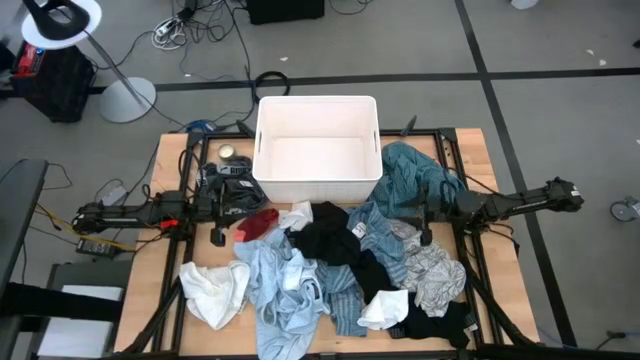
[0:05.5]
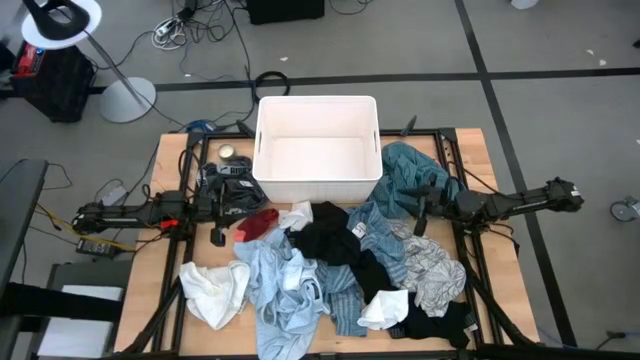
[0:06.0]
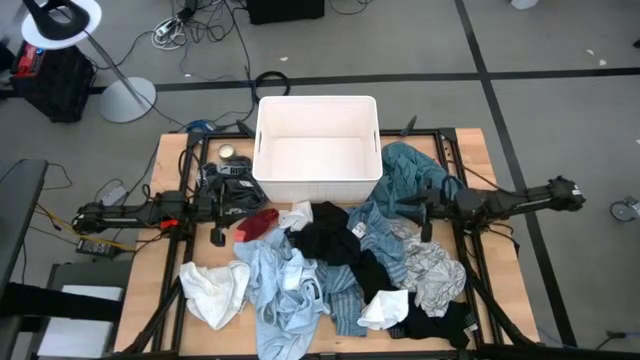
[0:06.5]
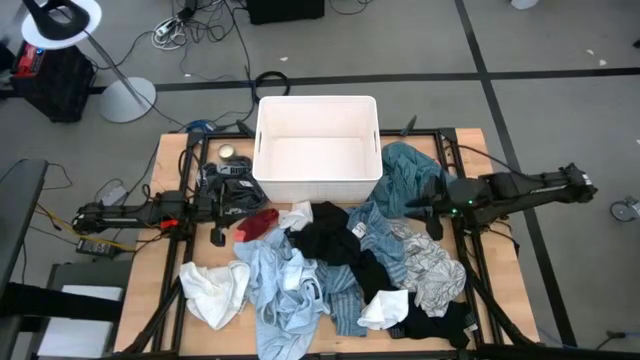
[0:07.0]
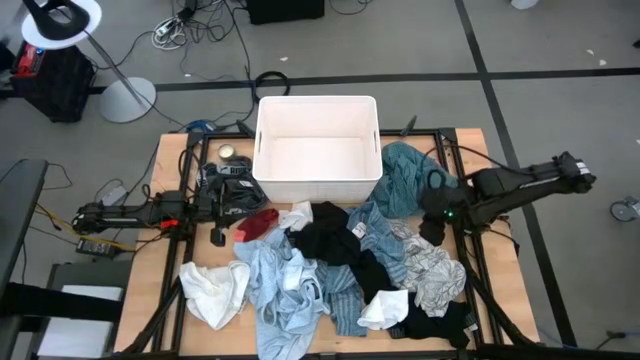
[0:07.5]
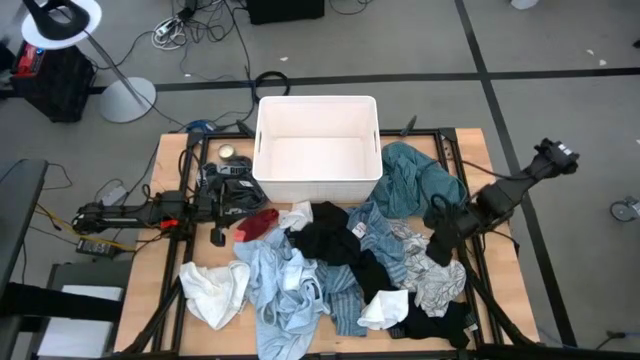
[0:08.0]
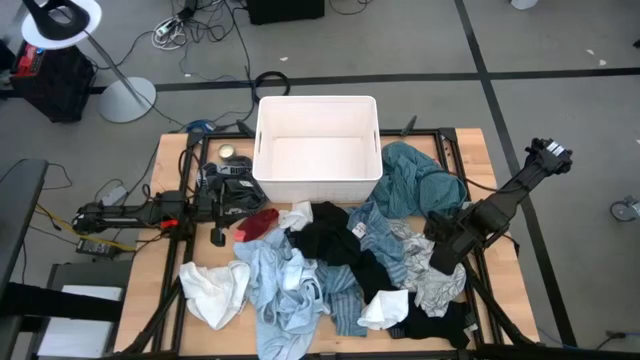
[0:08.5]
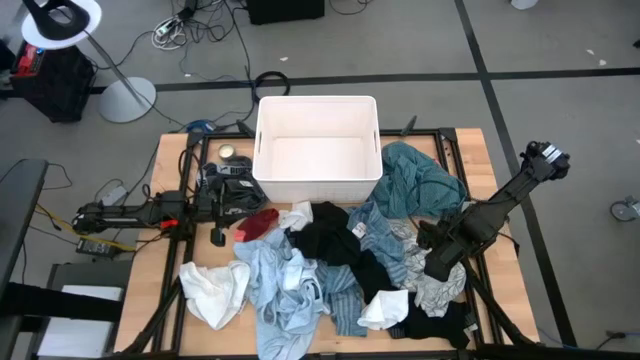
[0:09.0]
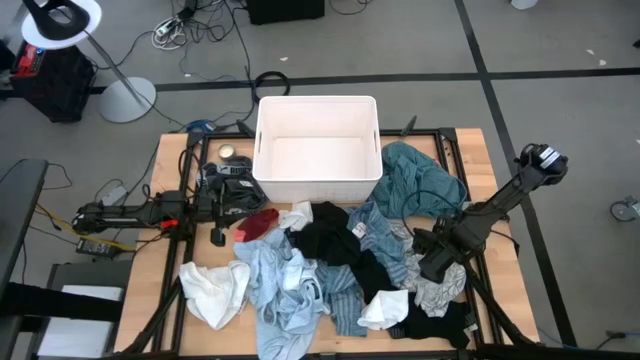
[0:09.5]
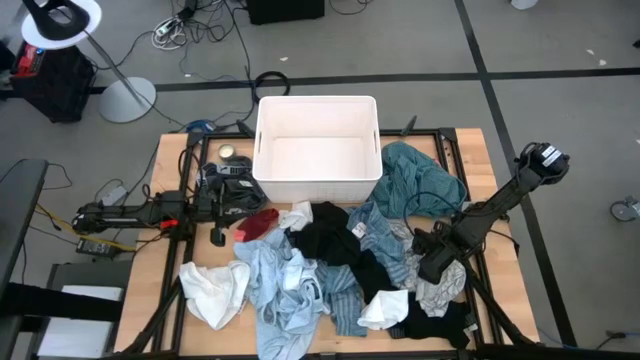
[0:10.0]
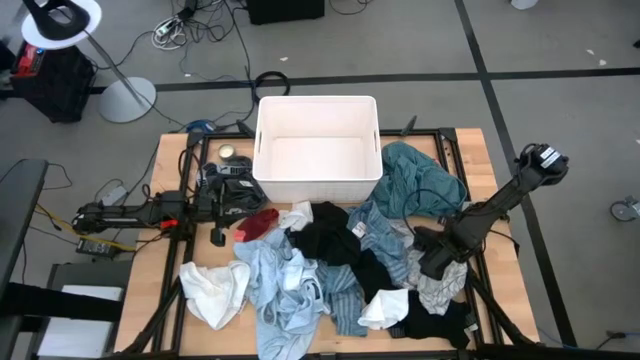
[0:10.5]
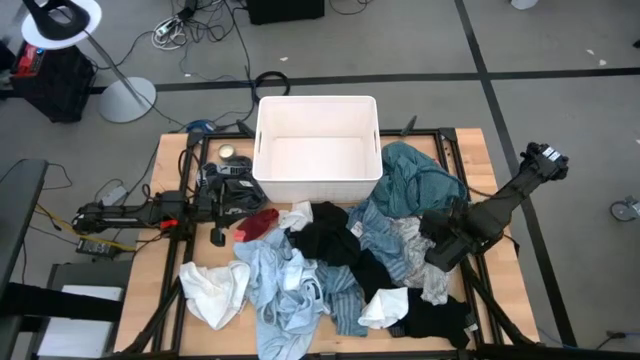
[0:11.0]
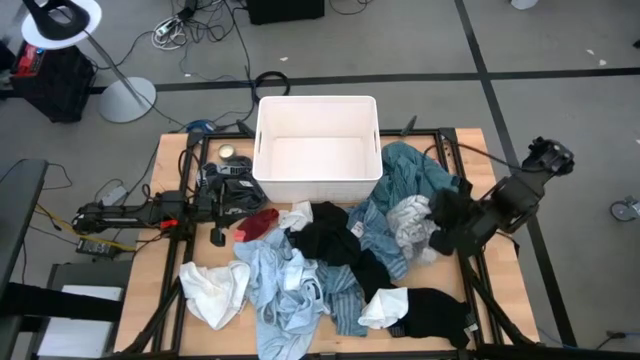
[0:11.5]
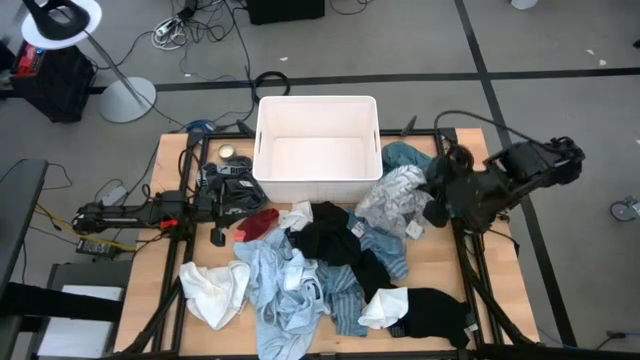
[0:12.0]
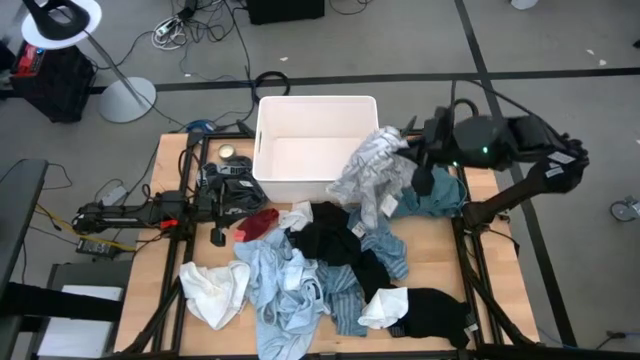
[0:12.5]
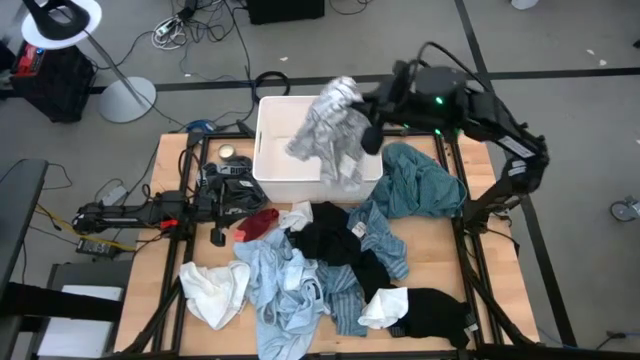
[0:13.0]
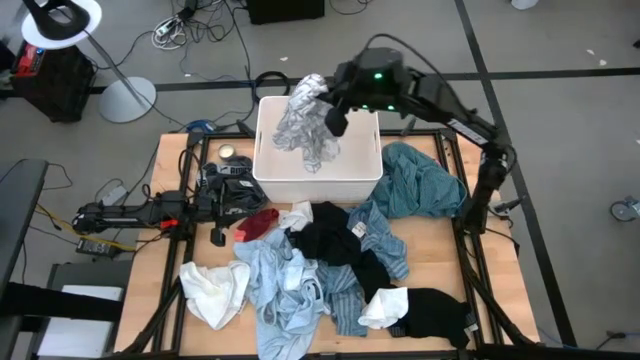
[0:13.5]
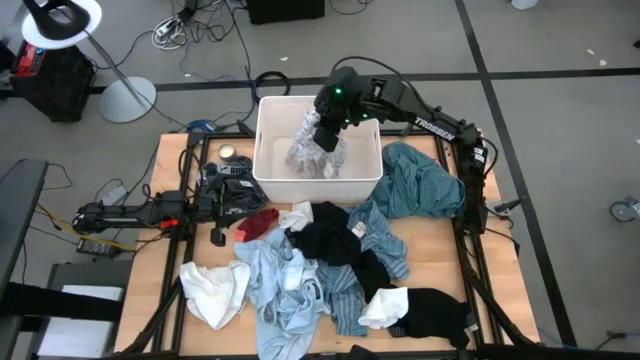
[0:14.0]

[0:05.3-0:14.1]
Task: Sort clothes
Put the white pajama pants into the laundry bin

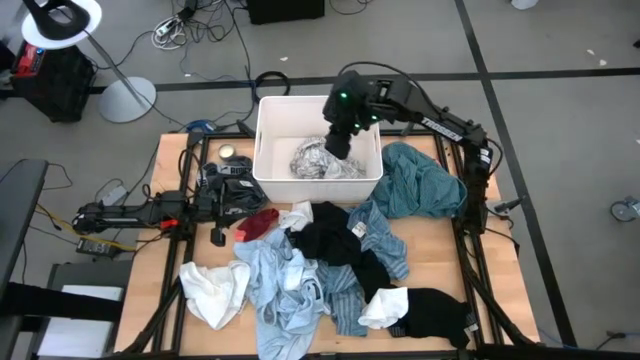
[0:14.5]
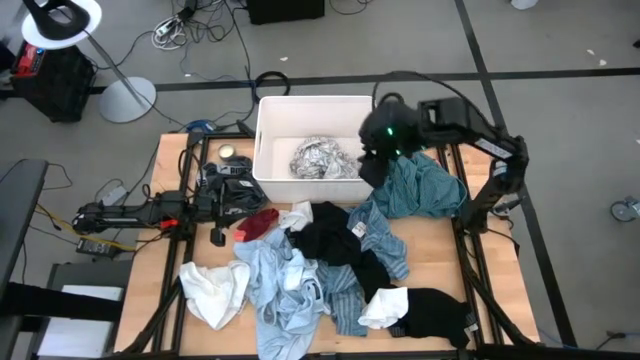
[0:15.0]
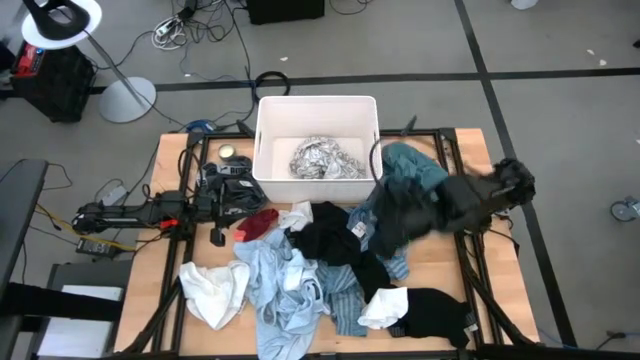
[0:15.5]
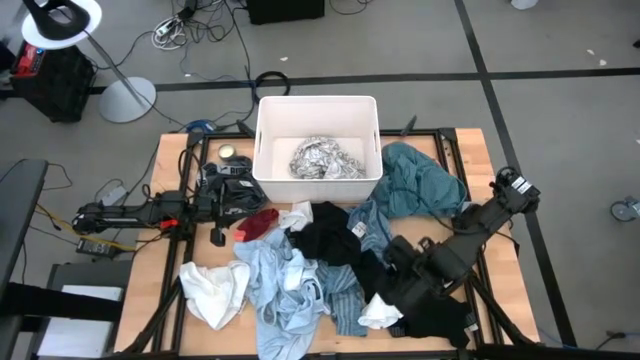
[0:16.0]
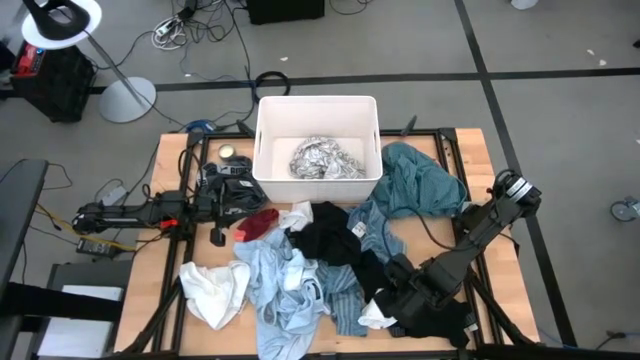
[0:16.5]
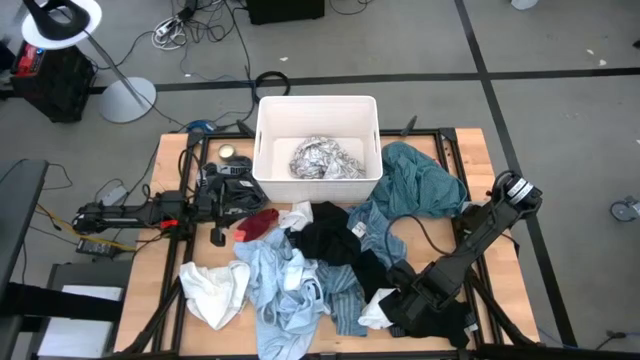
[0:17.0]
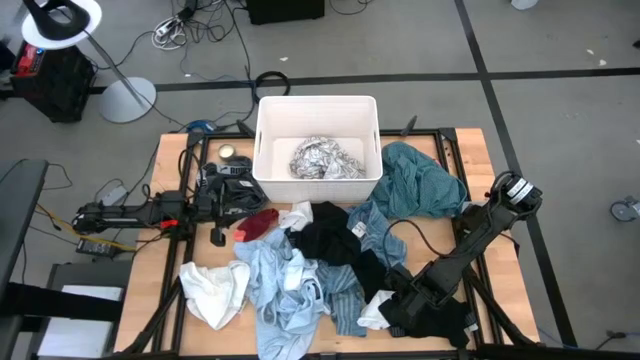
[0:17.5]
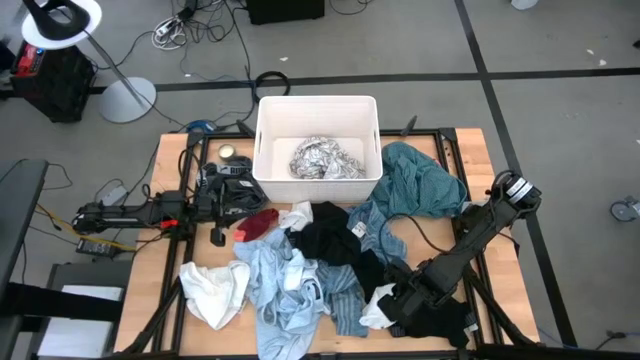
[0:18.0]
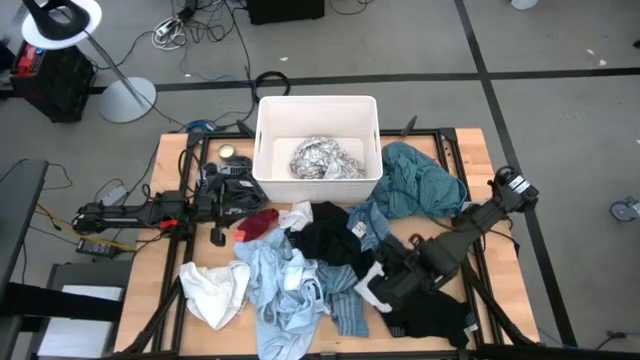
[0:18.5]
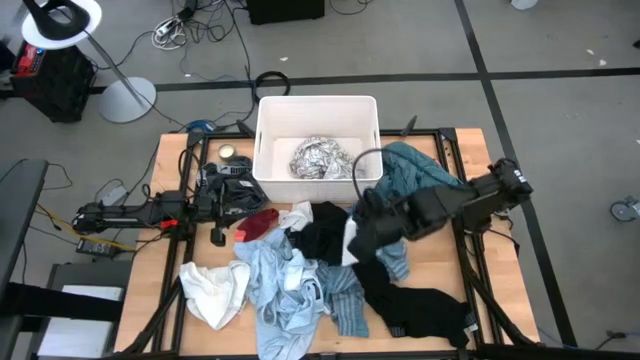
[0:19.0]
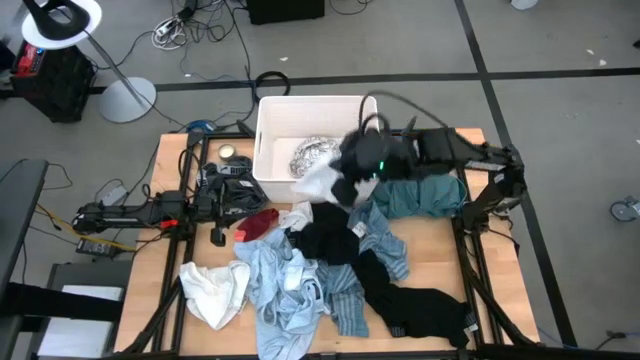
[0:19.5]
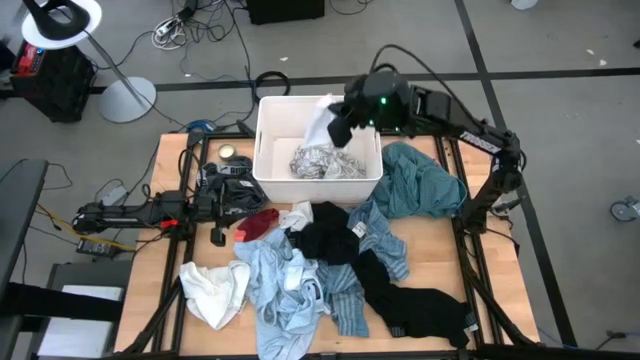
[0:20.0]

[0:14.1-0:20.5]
Put the white towel into the laundry bin

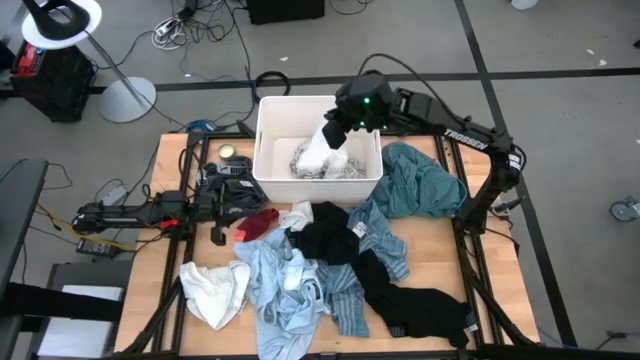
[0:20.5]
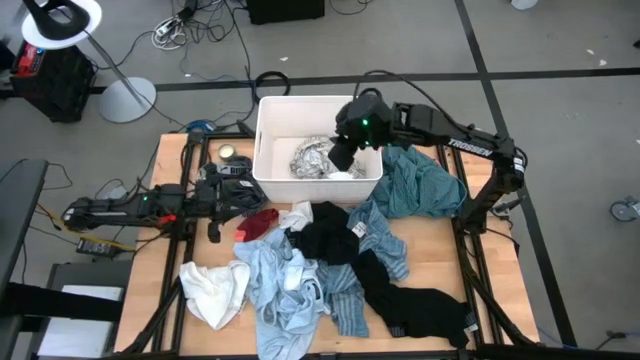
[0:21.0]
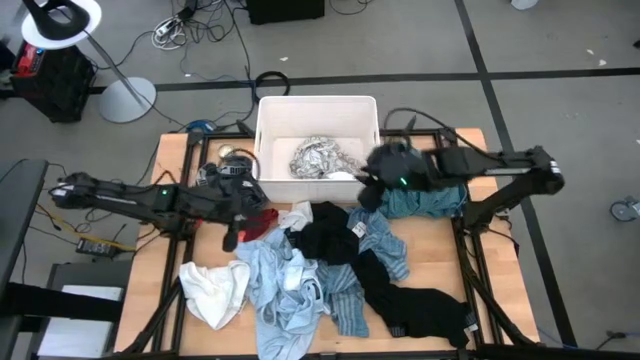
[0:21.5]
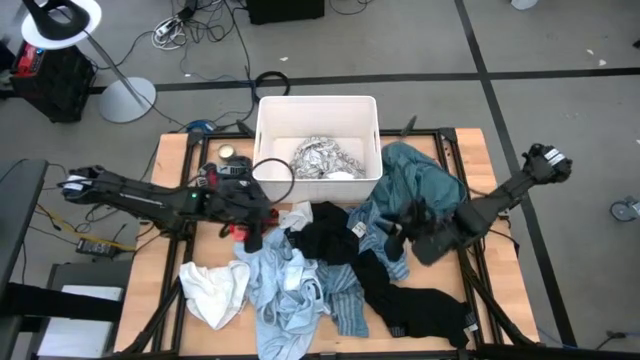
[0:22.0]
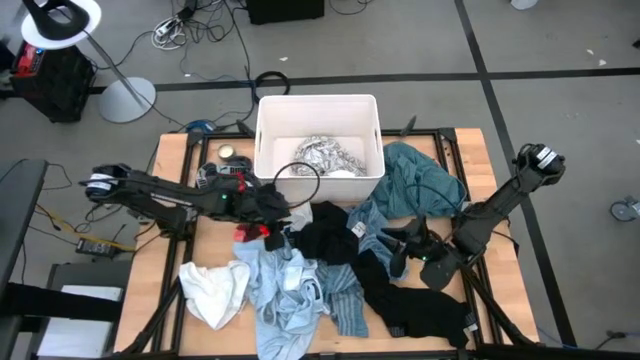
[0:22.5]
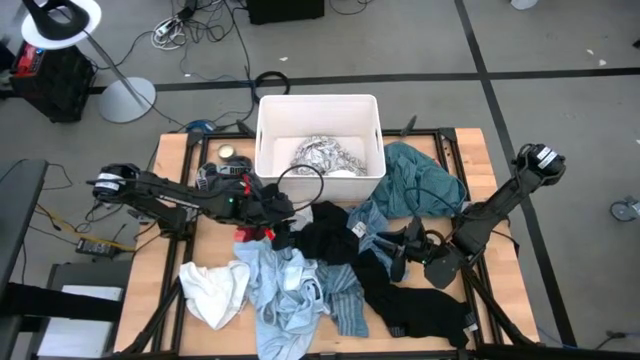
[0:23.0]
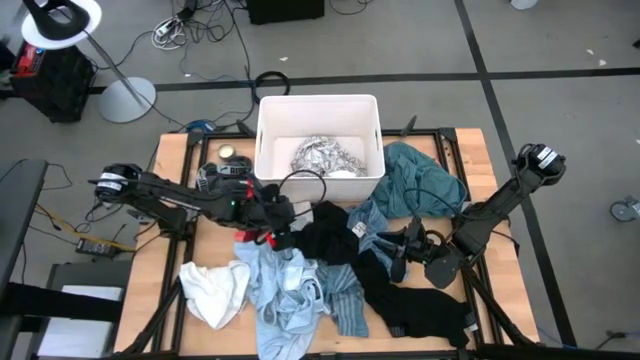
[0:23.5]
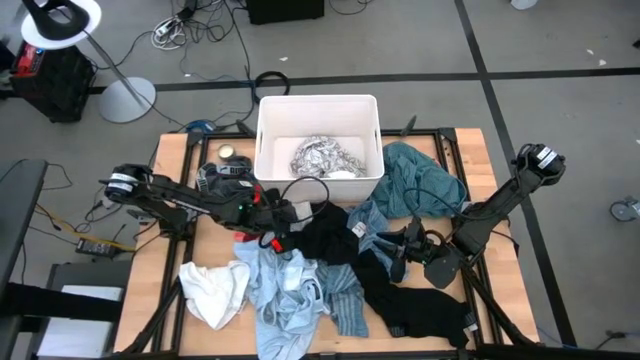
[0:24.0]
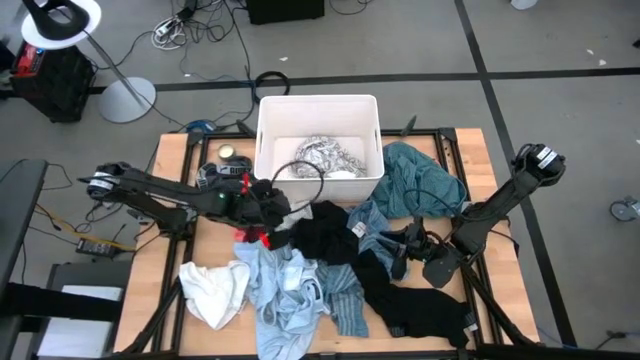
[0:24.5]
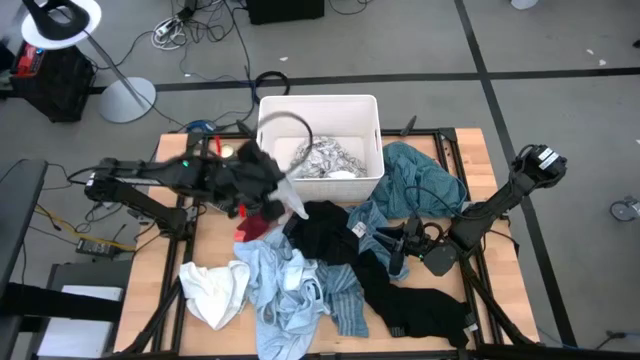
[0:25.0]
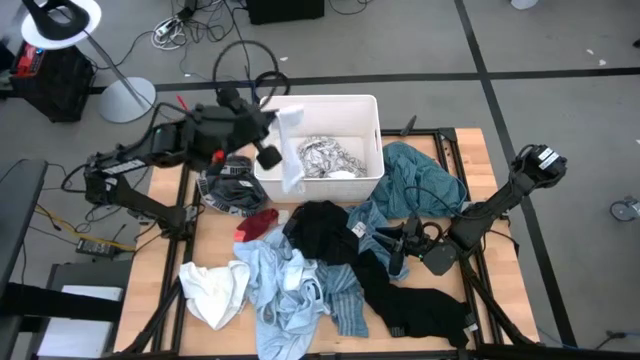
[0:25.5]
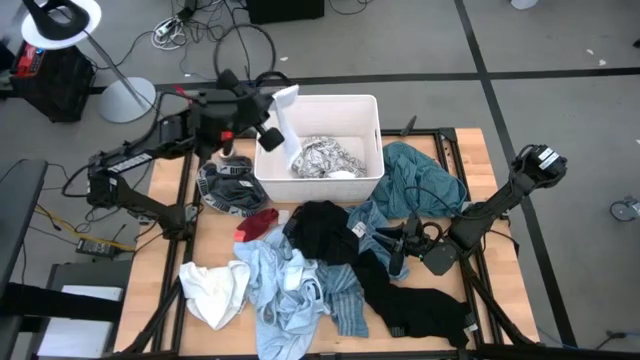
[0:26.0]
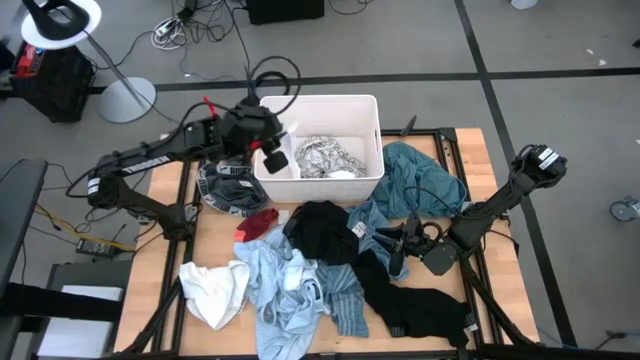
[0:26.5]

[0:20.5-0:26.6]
Put the white sock into the laundry bin

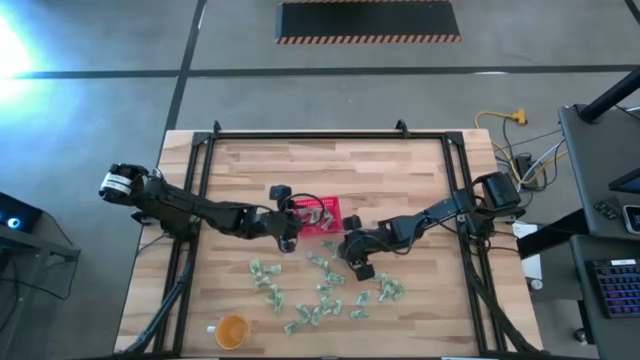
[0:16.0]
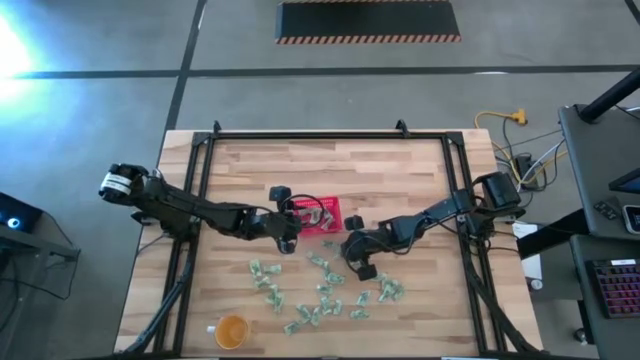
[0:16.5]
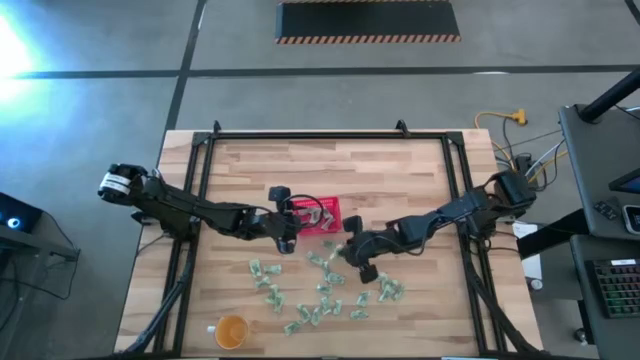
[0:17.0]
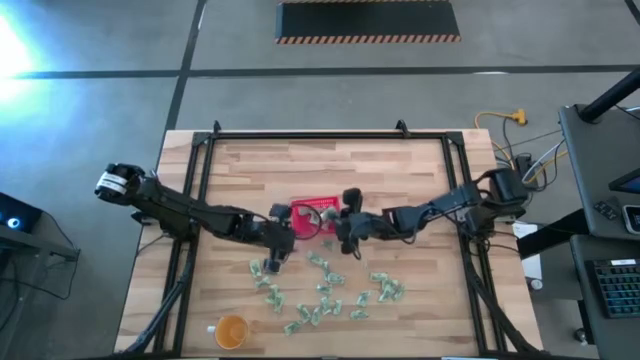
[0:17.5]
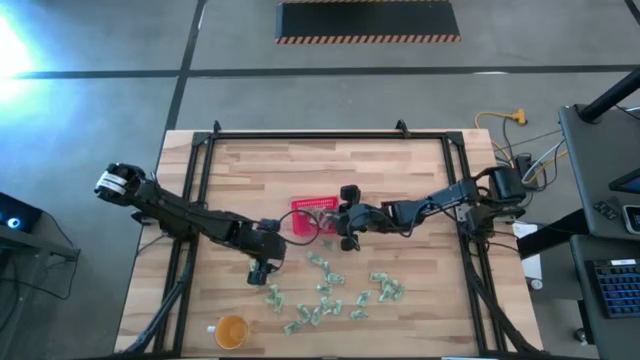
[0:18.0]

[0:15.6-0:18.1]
Task: Pick and place items into bin
Put the stevia packet into the red bin
